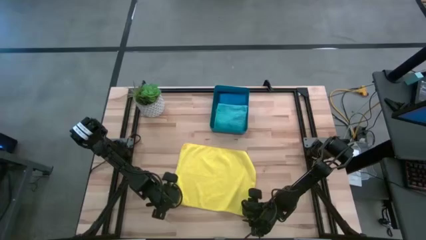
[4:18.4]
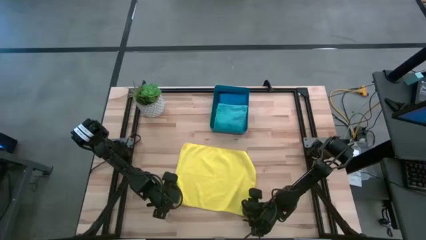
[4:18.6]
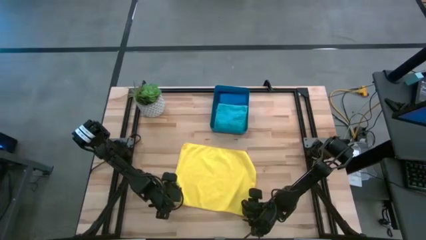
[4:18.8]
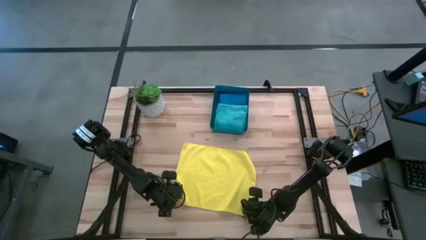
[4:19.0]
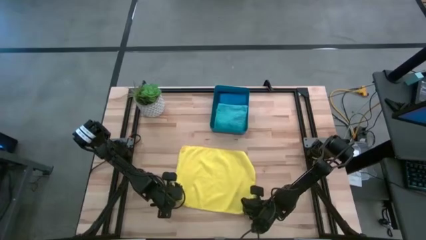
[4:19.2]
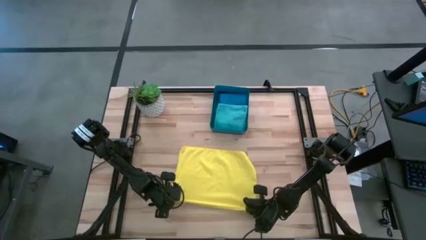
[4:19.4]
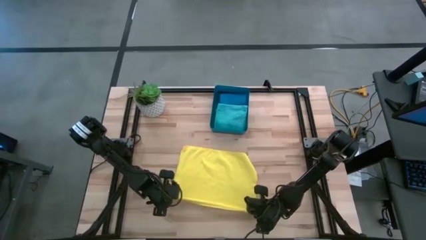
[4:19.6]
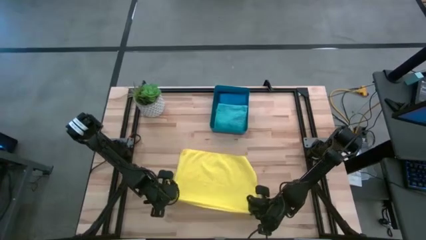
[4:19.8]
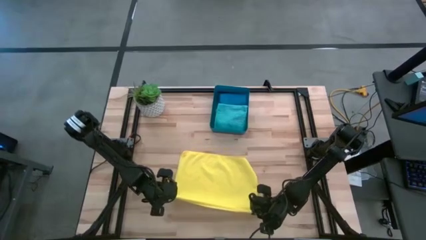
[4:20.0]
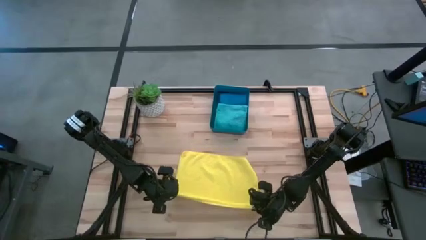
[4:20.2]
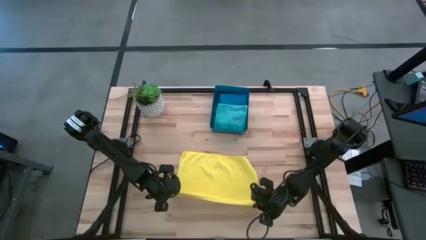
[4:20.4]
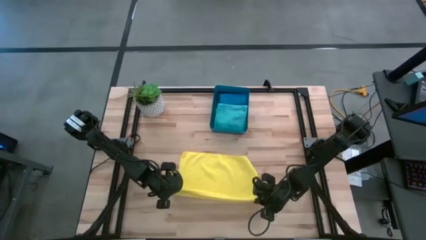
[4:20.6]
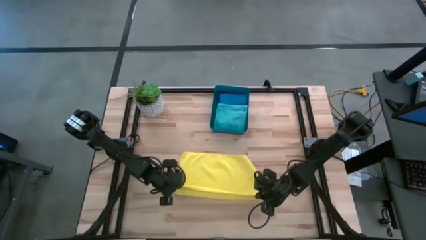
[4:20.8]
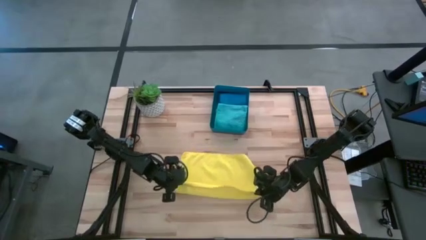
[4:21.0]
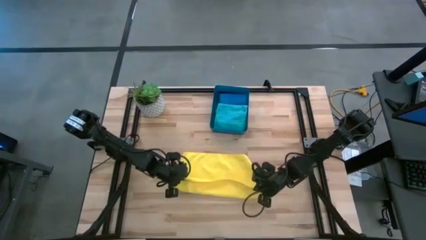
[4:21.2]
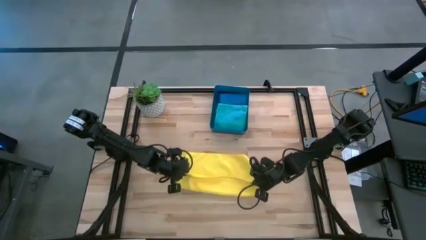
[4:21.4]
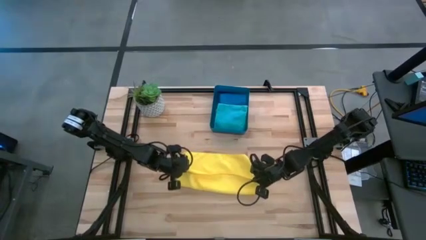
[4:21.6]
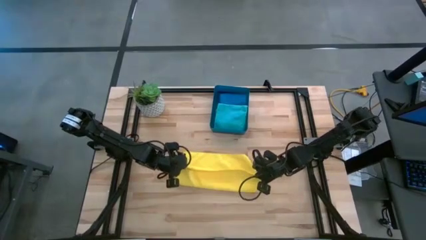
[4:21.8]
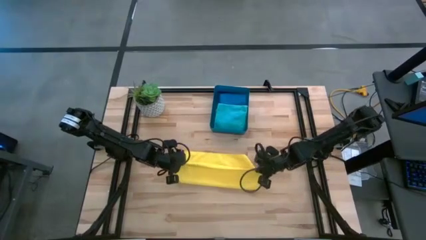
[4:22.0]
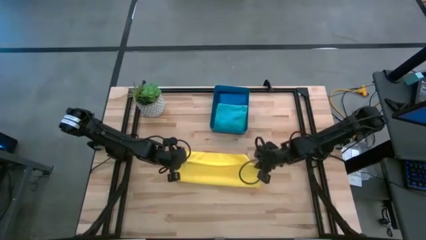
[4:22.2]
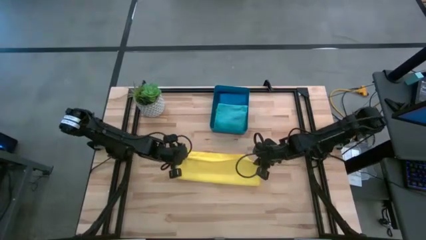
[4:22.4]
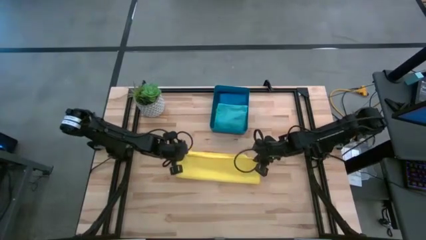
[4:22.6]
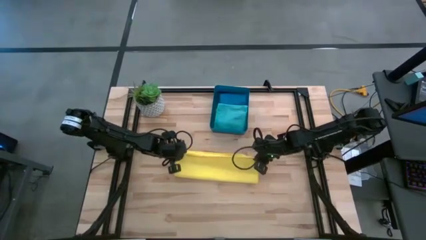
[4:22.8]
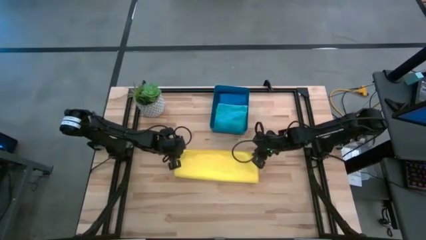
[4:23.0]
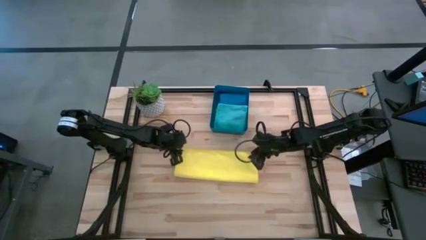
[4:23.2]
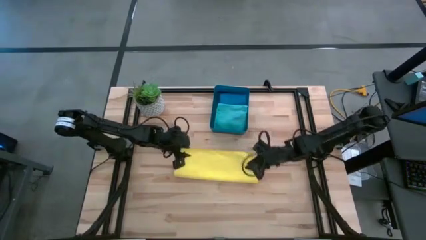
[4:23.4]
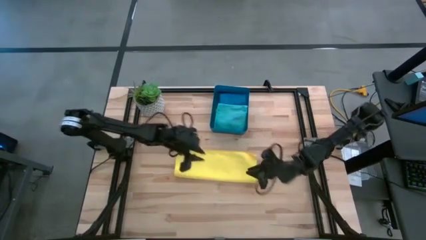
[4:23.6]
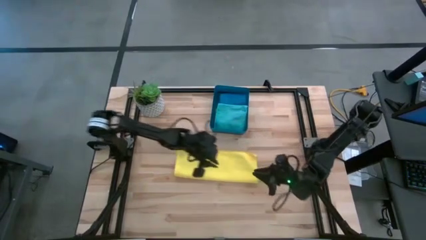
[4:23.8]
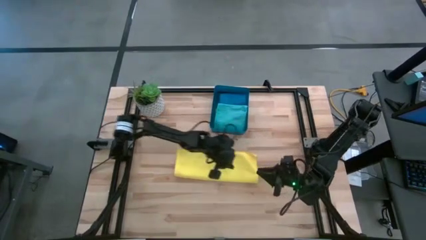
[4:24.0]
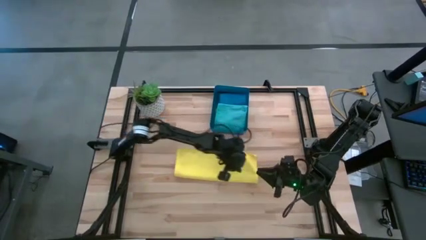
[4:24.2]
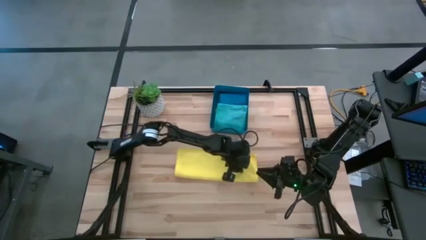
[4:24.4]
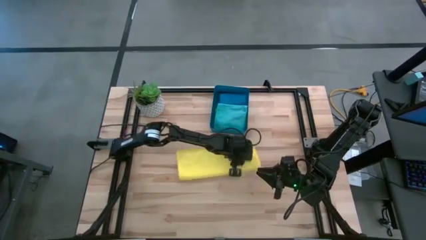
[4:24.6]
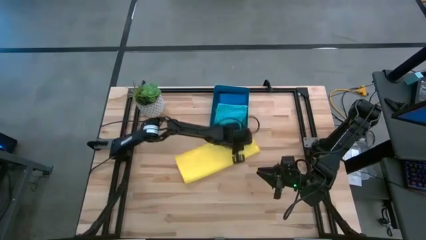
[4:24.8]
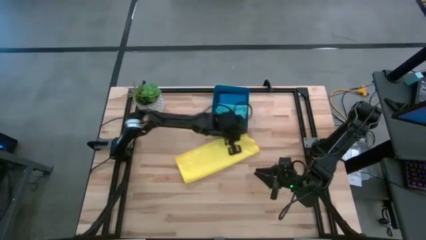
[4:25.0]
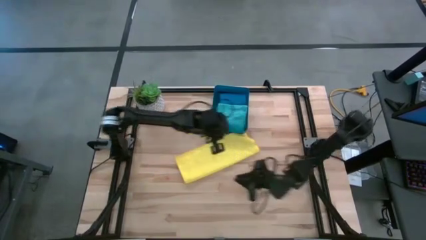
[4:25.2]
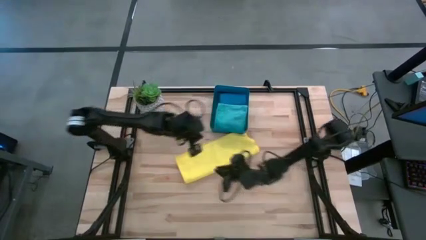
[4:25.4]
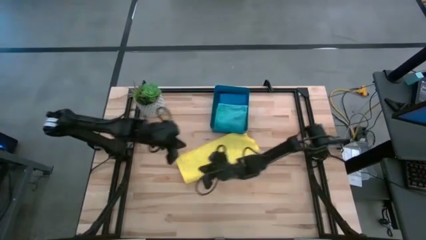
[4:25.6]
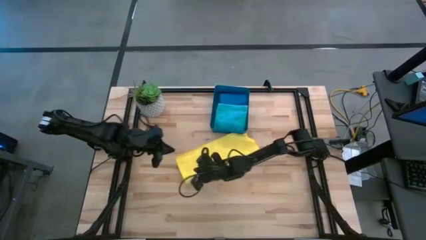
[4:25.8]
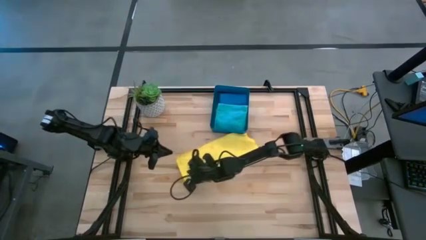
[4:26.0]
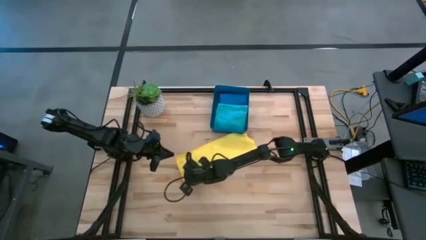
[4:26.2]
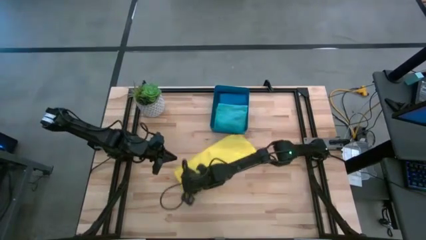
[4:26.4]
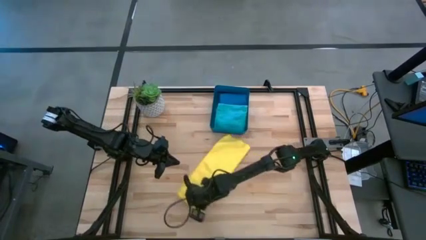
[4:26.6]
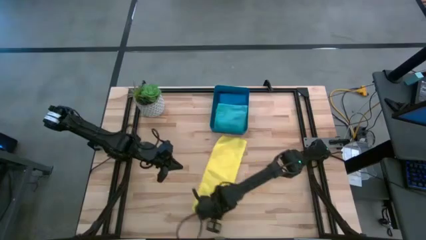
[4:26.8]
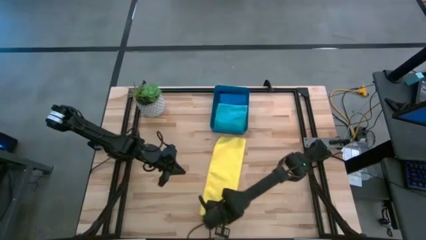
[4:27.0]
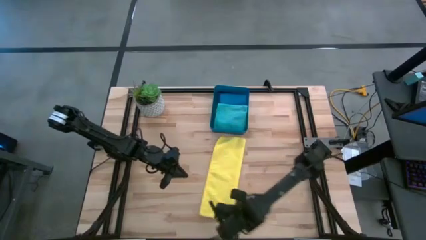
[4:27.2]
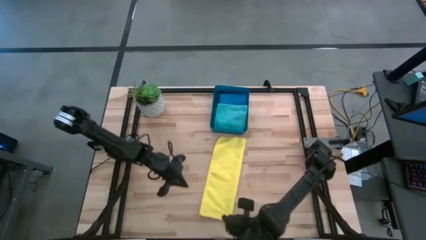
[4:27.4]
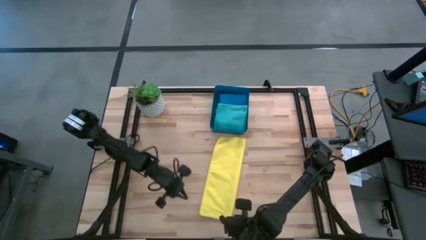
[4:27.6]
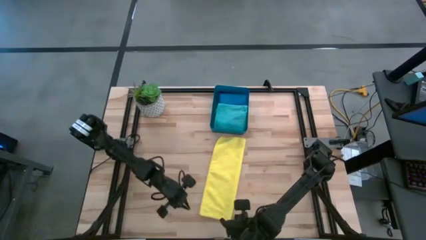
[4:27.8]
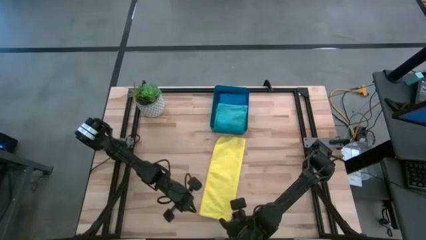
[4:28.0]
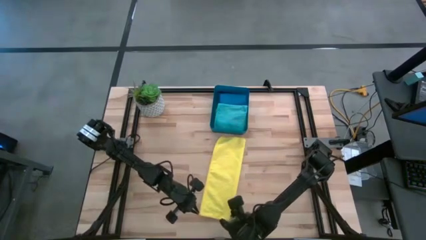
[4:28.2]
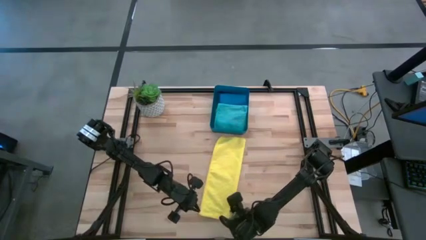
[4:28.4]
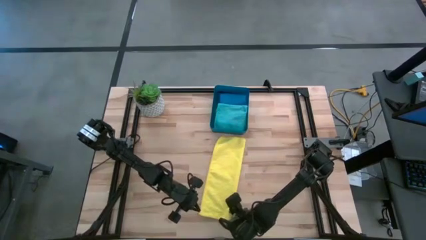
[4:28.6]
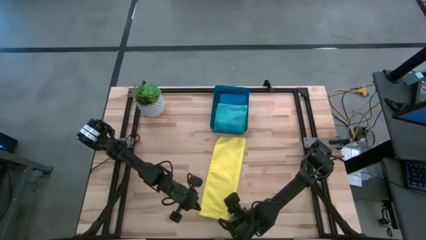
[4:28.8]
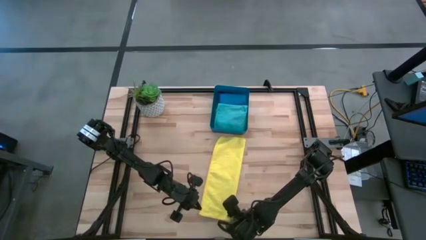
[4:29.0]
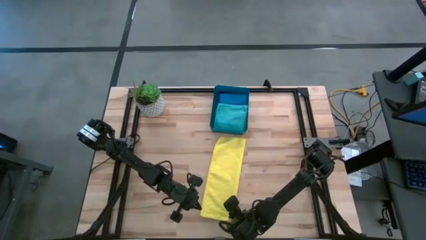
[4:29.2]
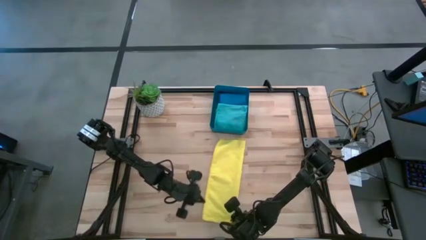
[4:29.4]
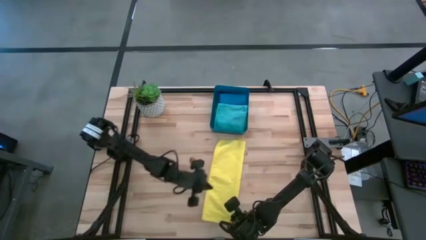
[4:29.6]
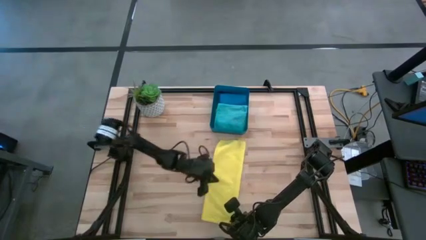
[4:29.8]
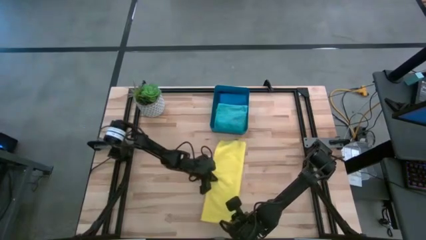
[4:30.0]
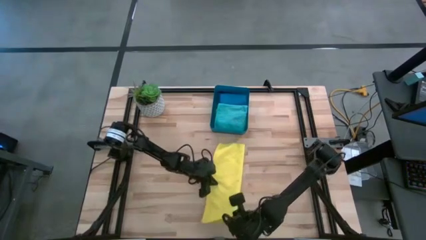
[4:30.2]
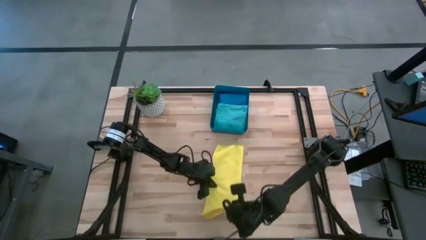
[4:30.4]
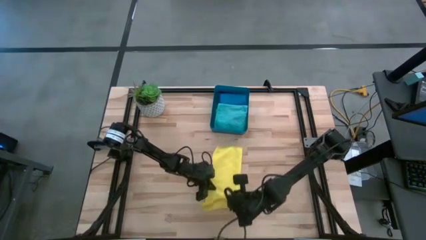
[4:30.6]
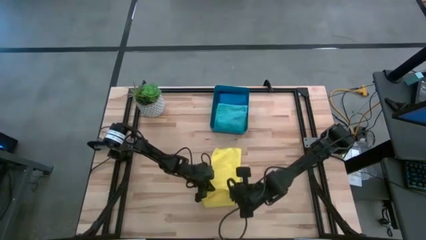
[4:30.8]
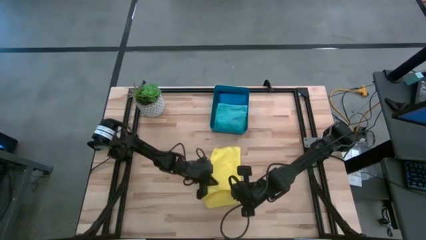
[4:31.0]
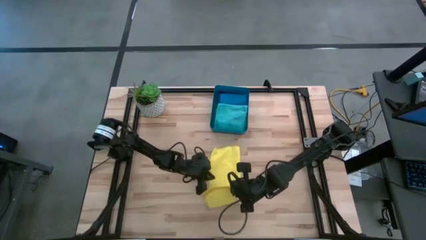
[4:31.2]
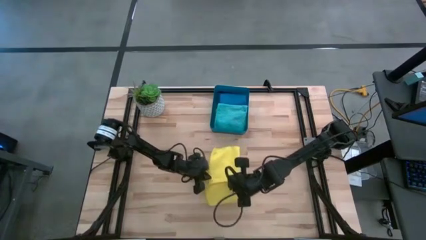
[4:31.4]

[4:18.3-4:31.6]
Task: Fold microfiber towels
Fold the yellow microfiber cloth

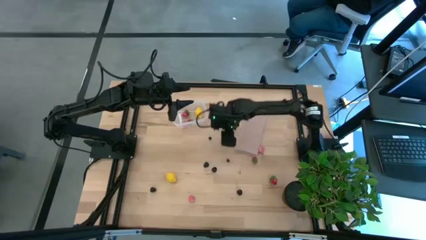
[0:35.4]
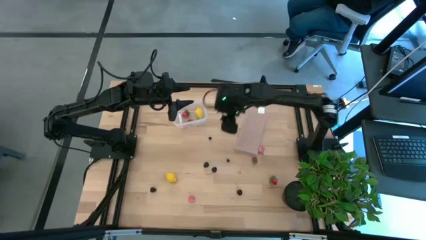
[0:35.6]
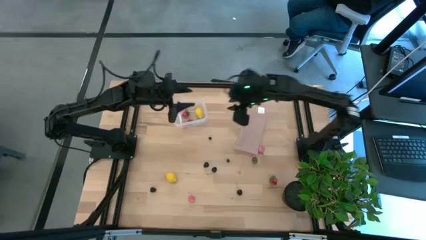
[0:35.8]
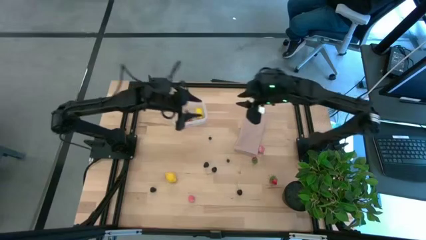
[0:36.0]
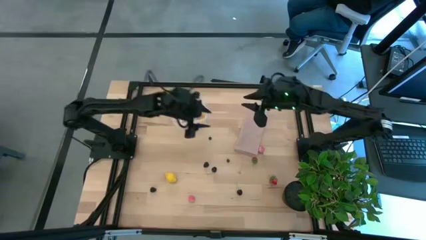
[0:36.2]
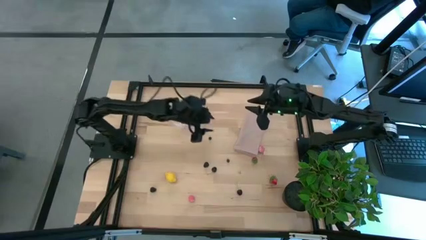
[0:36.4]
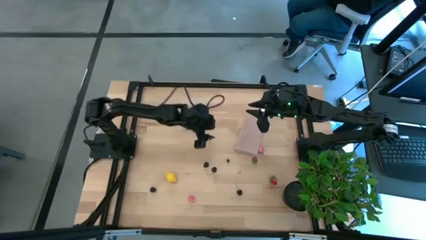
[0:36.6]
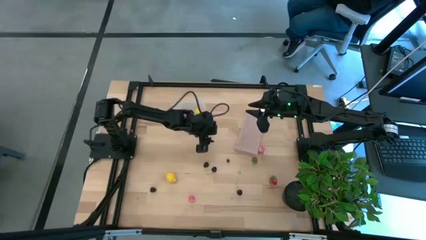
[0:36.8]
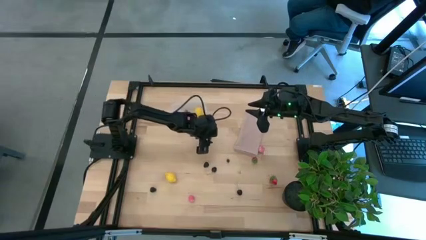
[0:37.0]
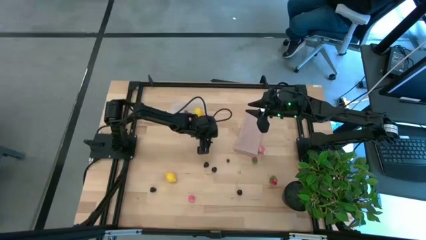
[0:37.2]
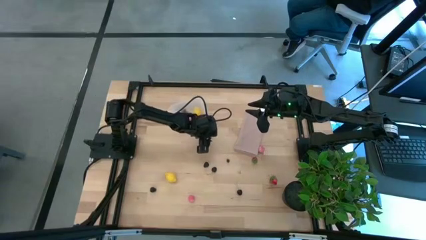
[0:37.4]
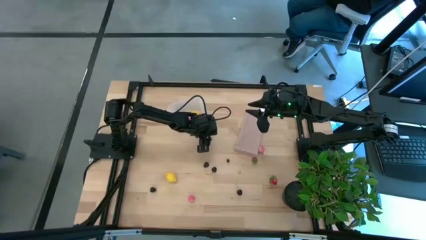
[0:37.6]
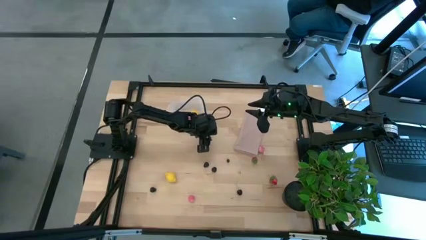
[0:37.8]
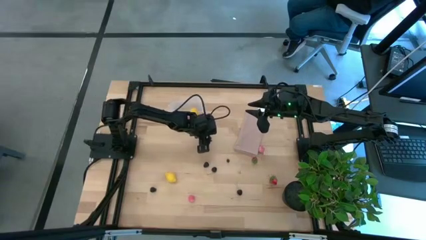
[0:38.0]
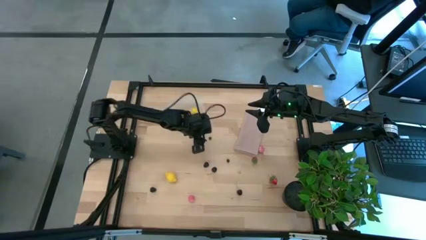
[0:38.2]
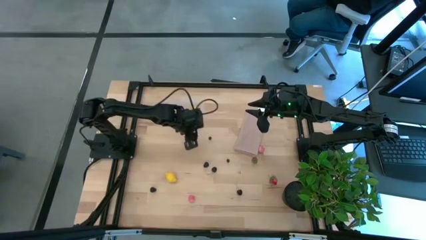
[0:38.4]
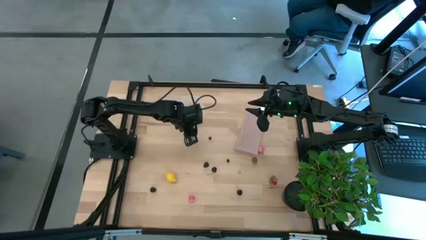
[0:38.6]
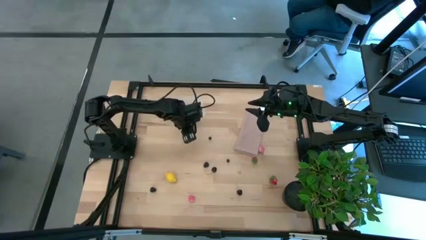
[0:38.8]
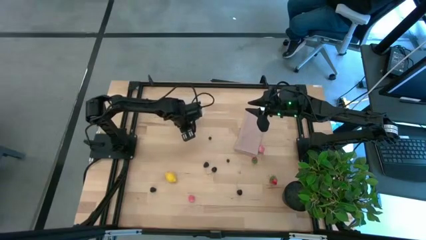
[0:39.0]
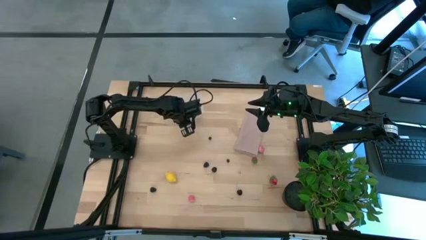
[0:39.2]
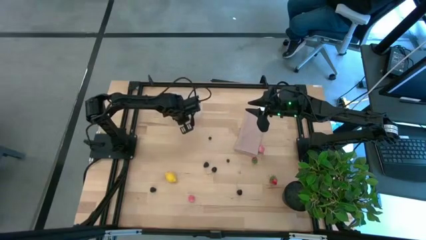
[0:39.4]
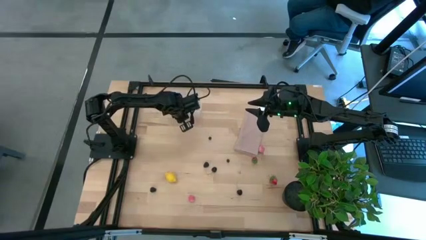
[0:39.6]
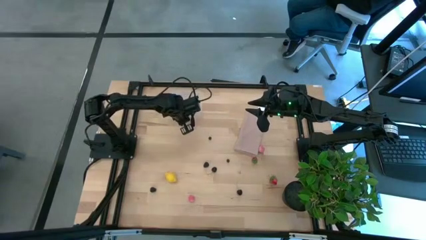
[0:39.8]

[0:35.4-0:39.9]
Task: Pick and placing Produce into tupperware
Adjust the transparent bin
